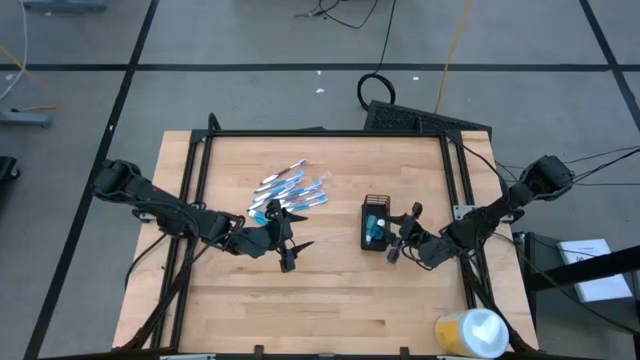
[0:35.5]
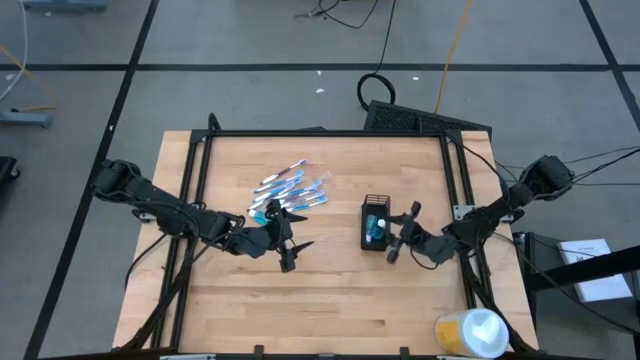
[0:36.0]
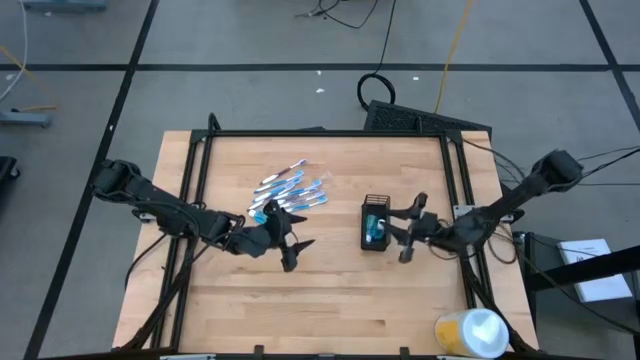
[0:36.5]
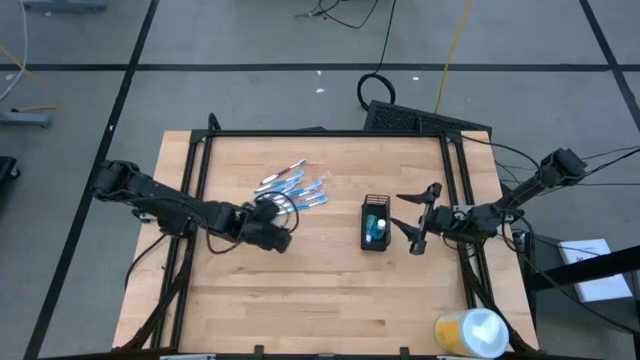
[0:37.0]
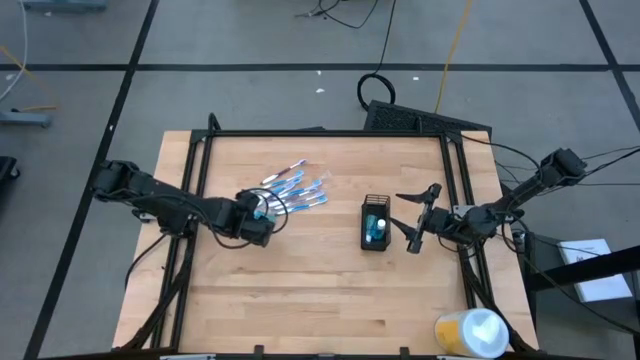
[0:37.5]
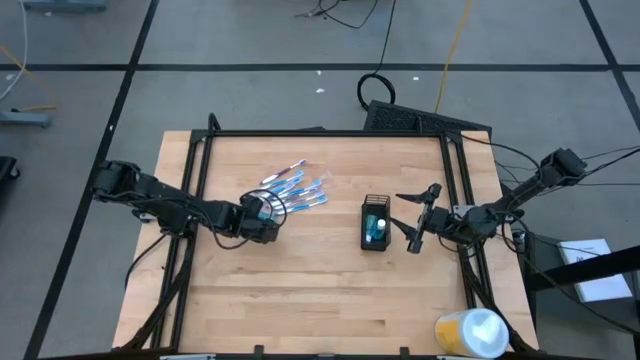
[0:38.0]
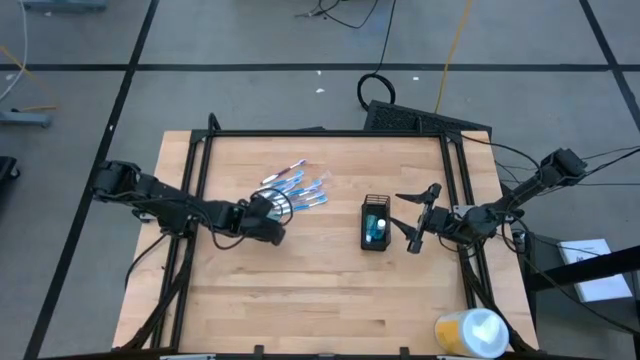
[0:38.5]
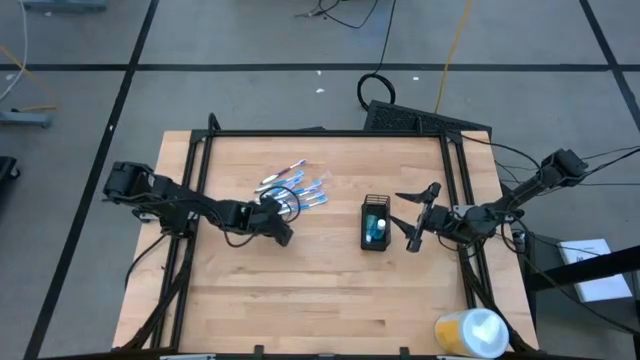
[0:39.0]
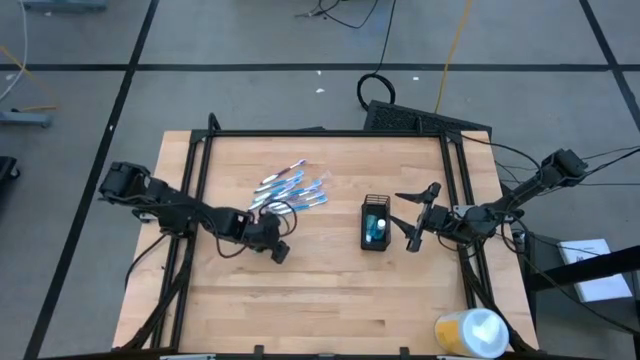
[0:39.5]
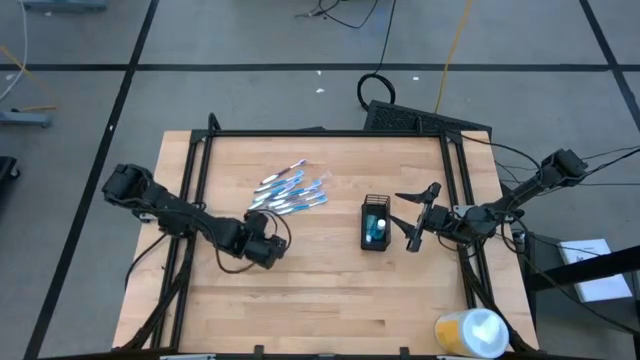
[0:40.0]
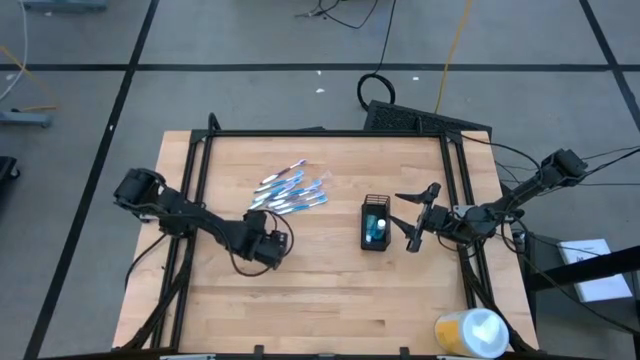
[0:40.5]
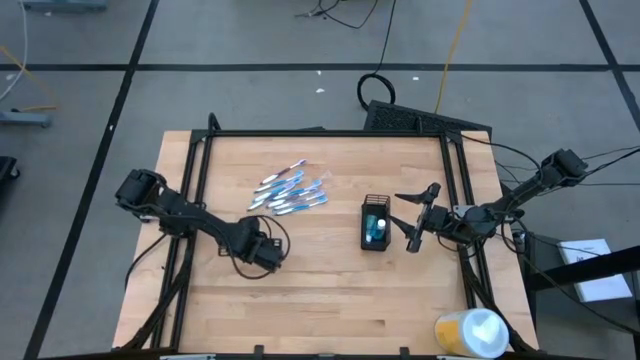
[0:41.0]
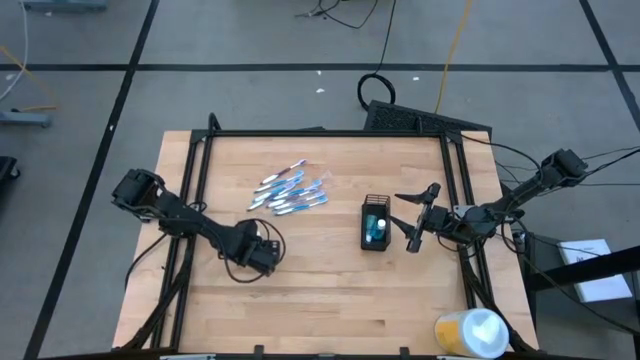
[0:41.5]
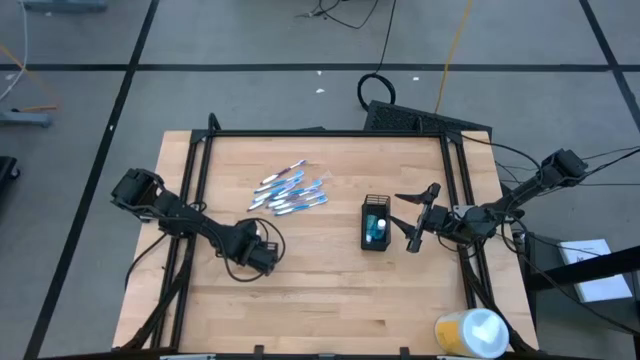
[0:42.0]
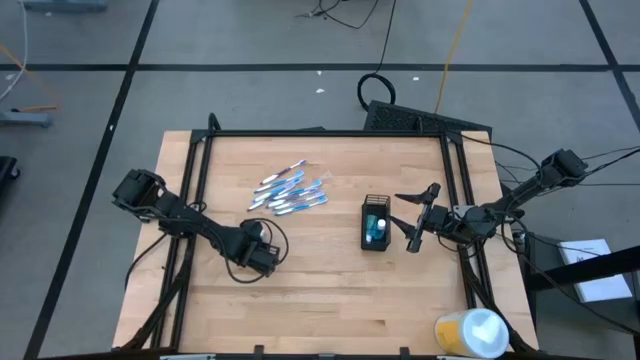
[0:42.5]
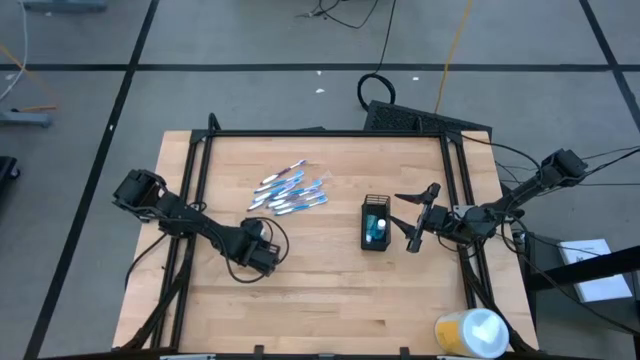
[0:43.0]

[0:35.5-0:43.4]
Task: Pick & Place toothbrushing station
Put the mouthwash into the middle section of the mesh organizer

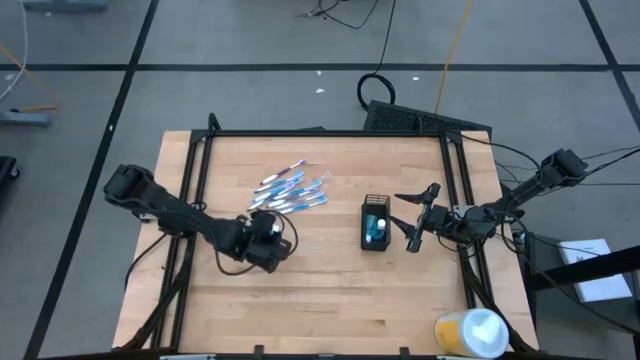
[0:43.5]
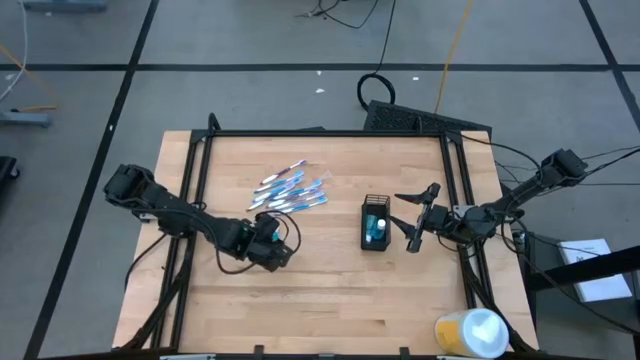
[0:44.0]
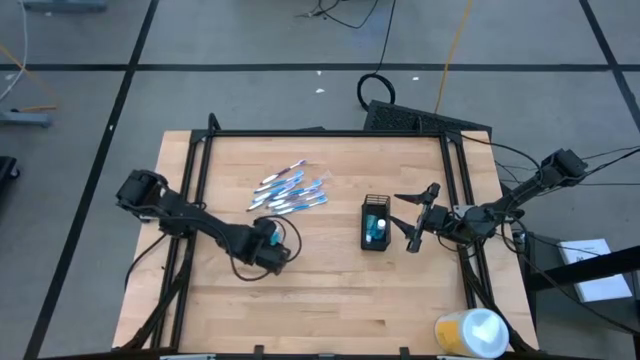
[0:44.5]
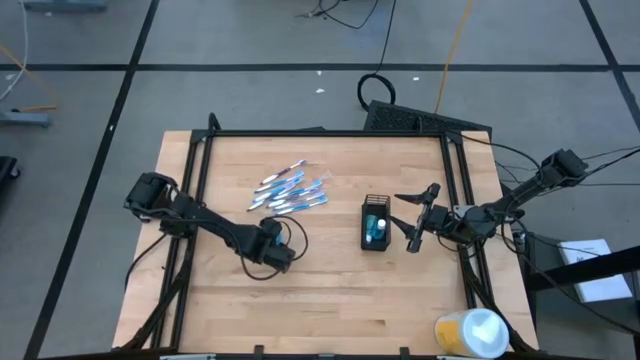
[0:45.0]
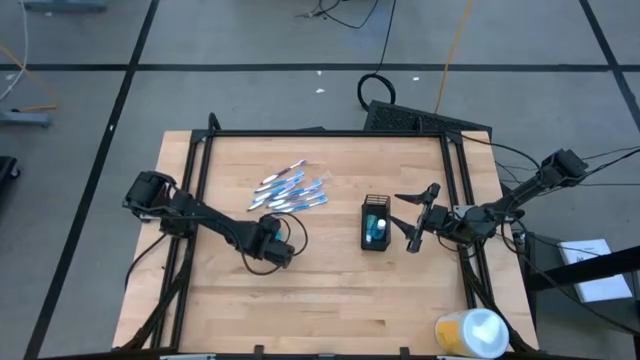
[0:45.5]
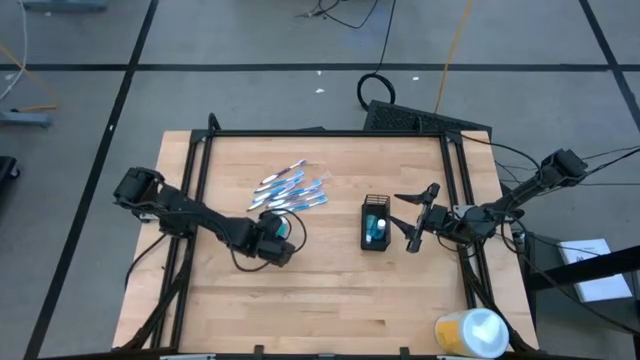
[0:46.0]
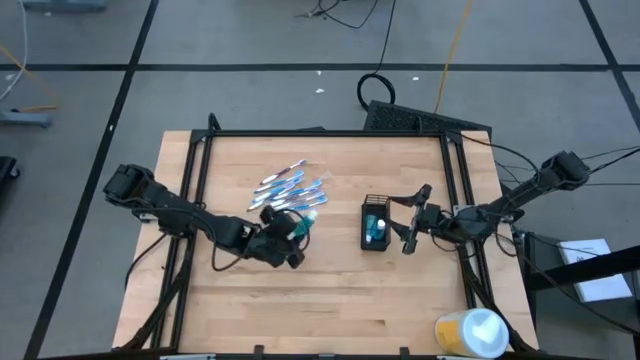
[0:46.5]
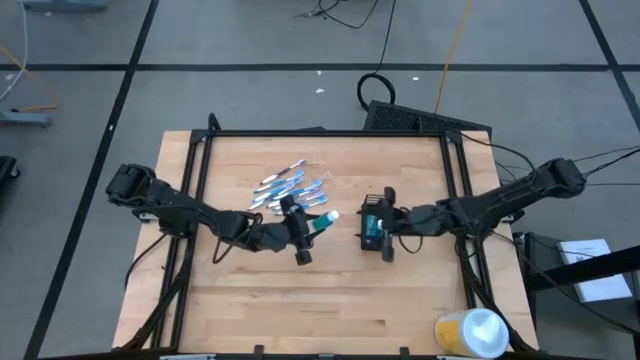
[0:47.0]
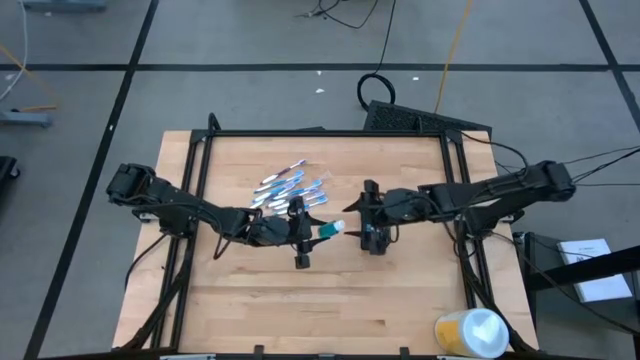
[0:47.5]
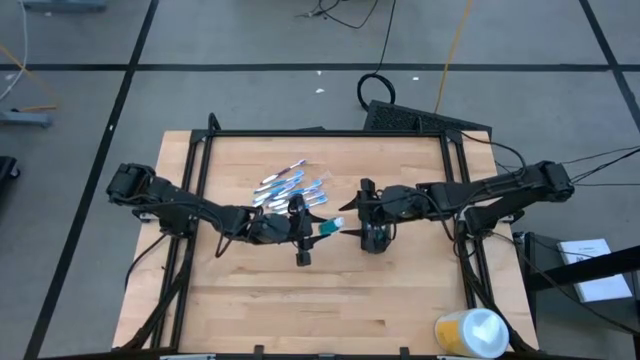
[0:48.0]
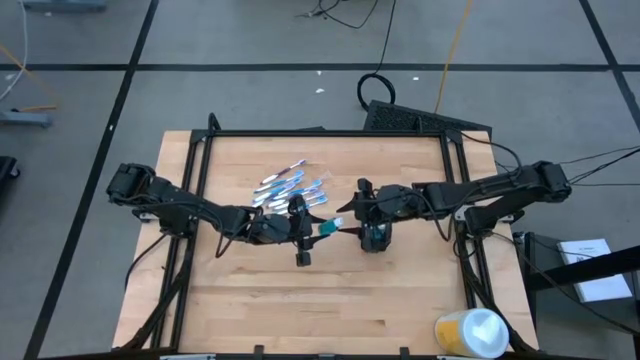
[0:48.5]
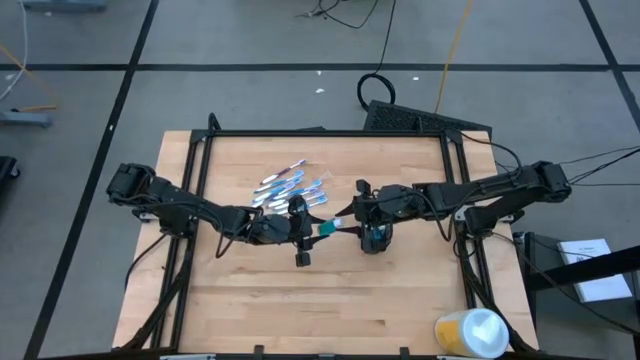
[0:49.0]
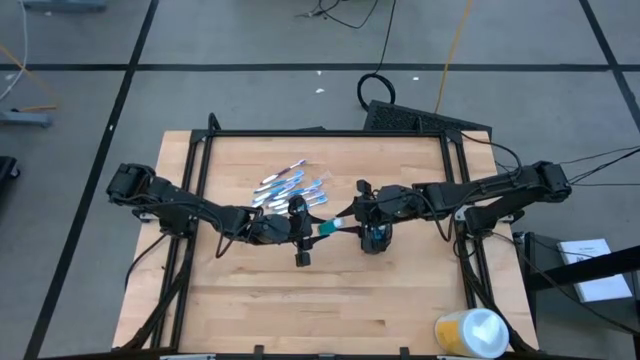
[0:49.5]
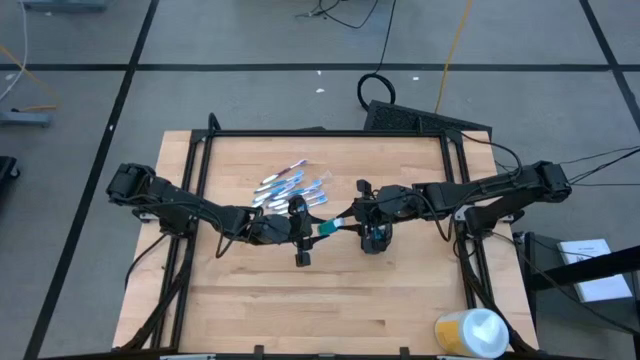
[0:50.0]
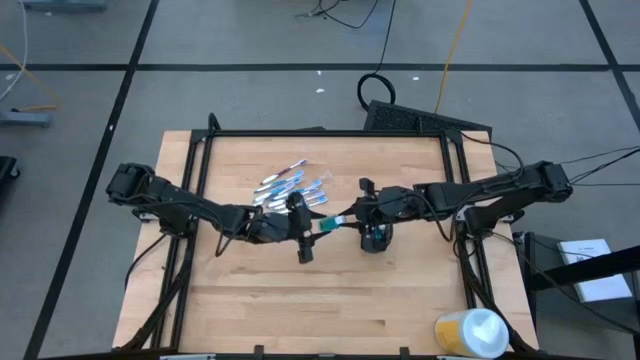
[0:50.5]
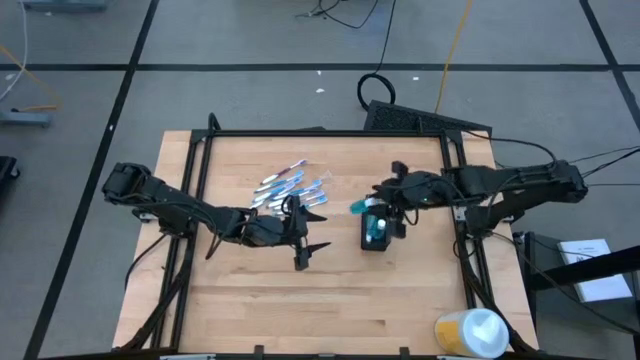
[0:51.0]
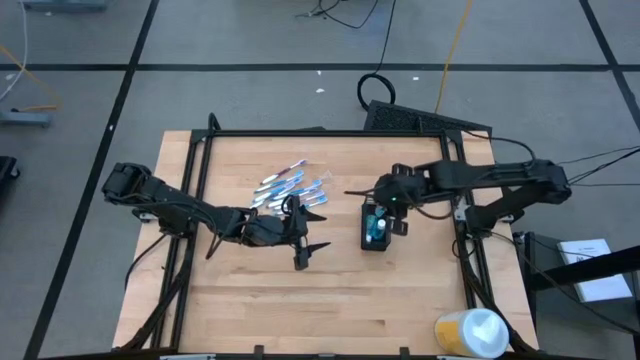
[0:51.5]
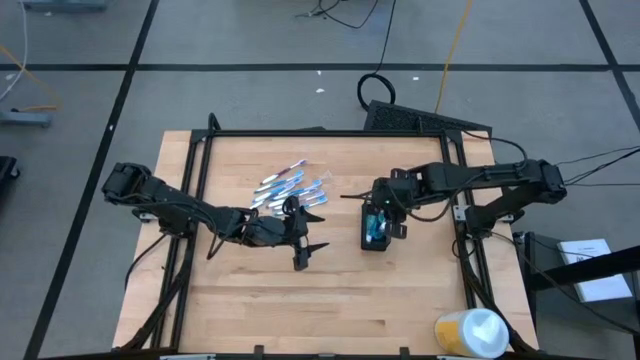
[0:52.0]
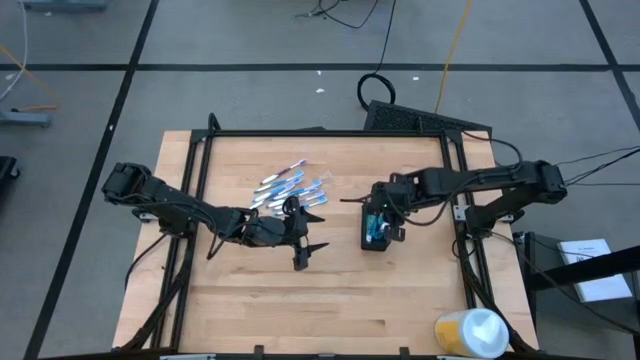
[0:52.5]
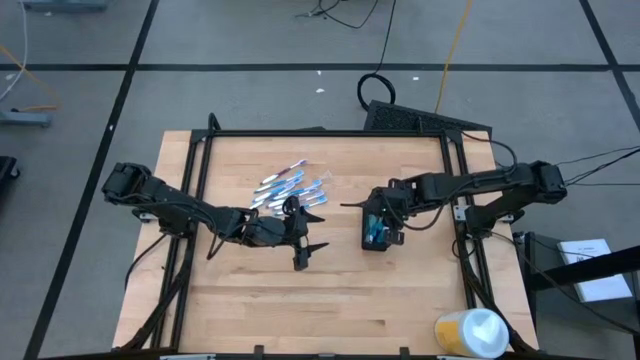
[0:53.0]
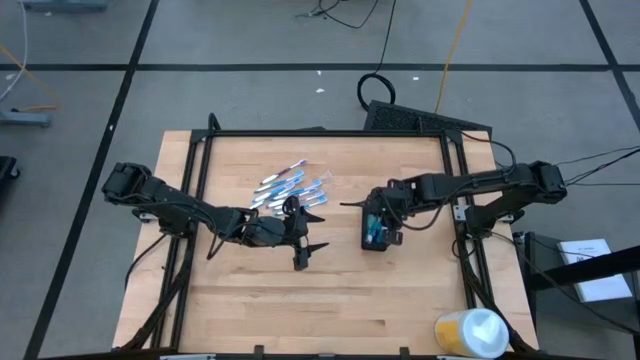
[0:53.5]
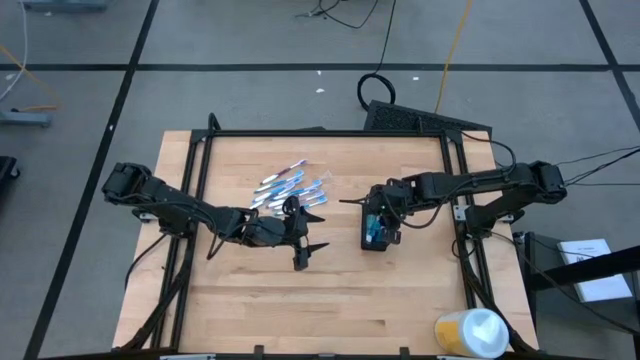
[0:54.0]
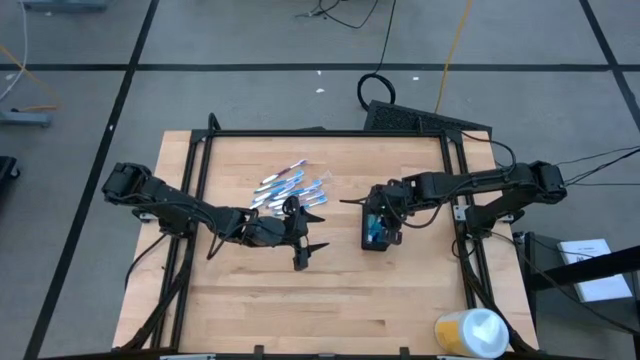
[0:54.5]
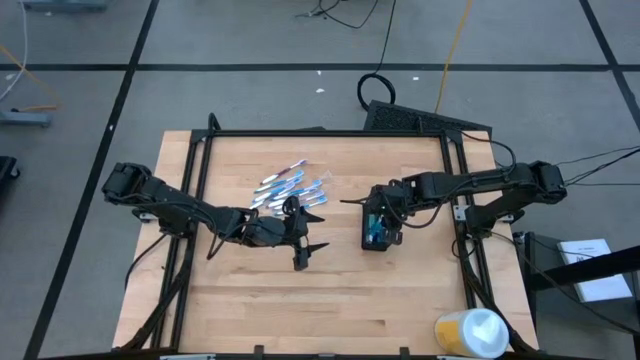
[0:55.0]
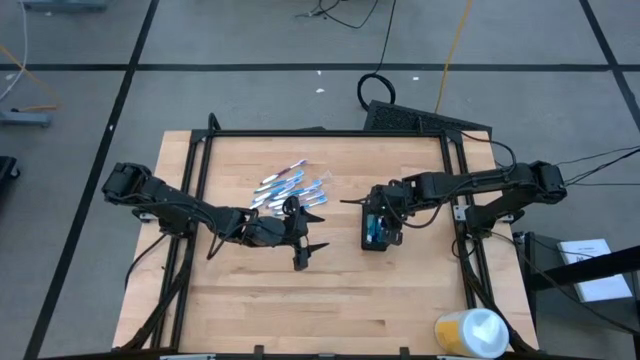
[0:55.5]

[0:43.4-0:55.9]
Put the mouthwash into the middle section of the mesh organizer

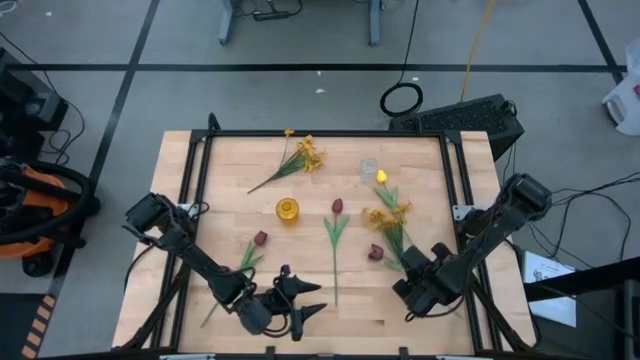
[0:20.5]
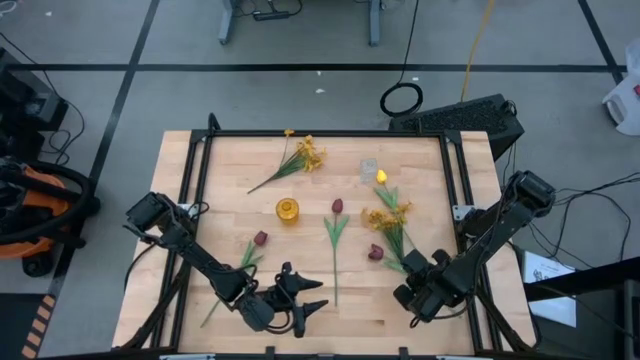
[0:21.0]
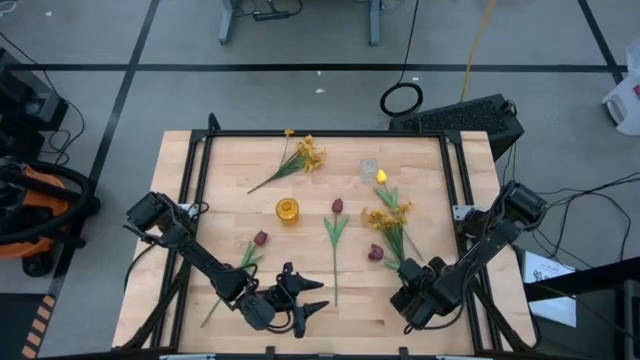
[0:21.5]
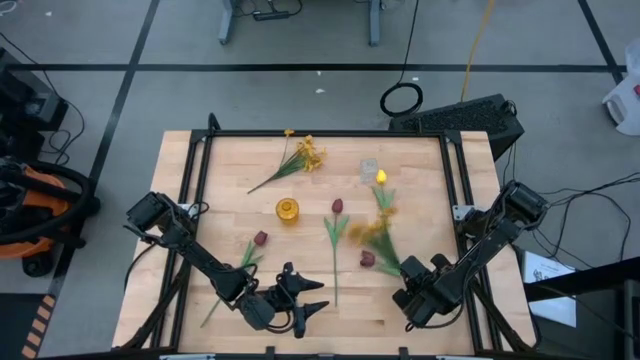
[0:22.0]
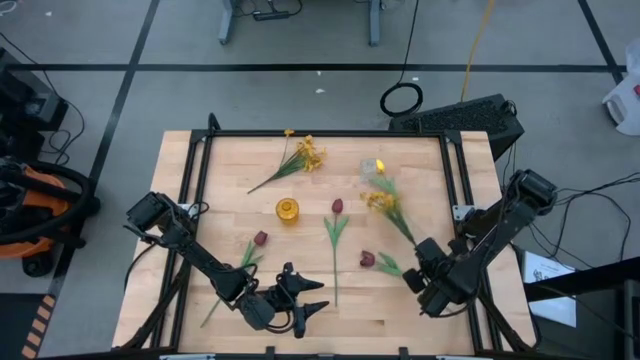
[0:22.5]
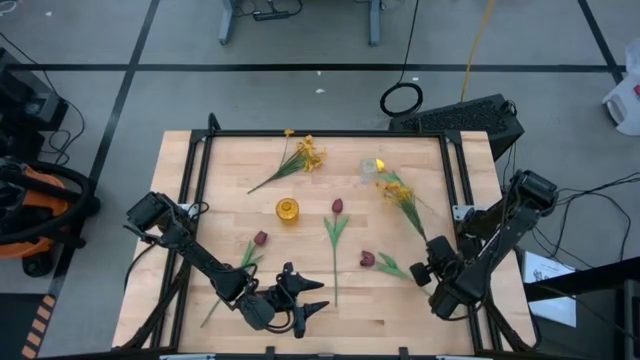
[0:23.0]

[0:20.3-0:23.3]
Task: Sort flowers into vase by color
Adjust the bottom yellow flowers
